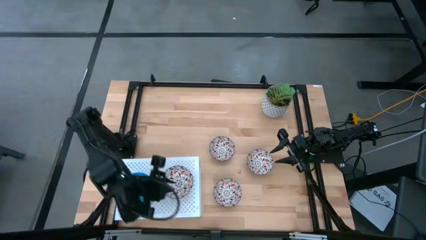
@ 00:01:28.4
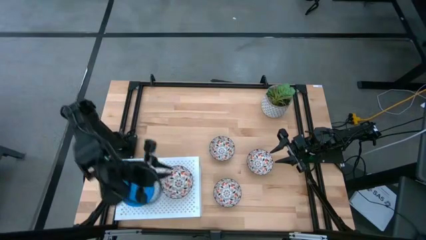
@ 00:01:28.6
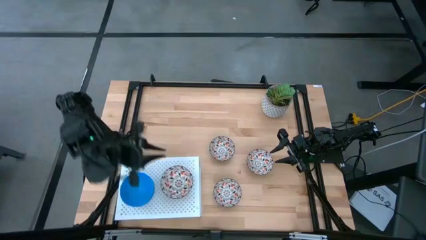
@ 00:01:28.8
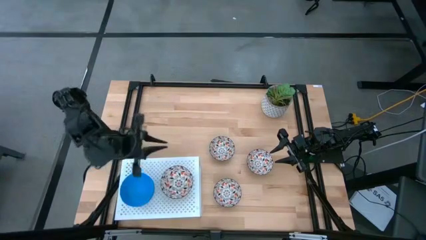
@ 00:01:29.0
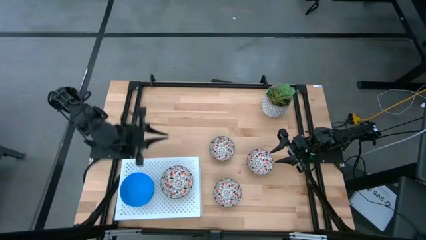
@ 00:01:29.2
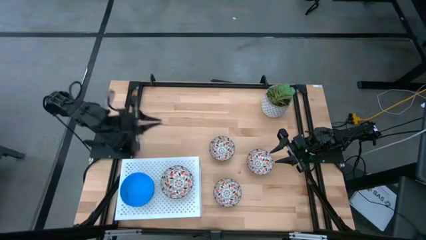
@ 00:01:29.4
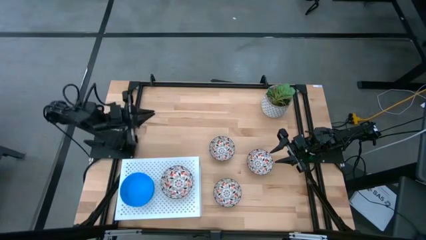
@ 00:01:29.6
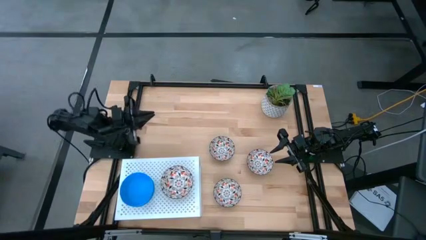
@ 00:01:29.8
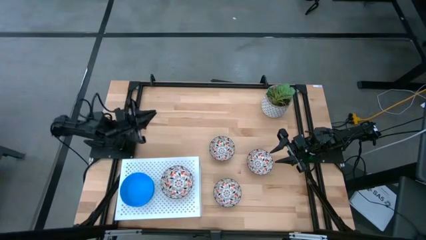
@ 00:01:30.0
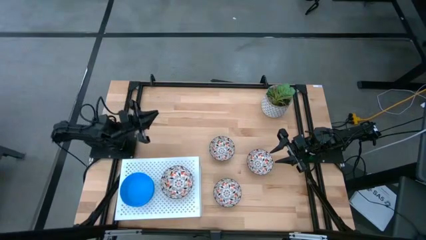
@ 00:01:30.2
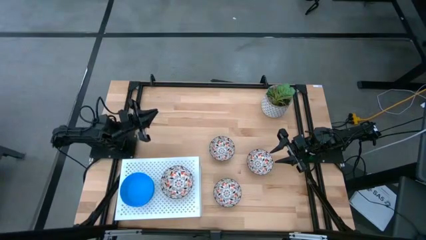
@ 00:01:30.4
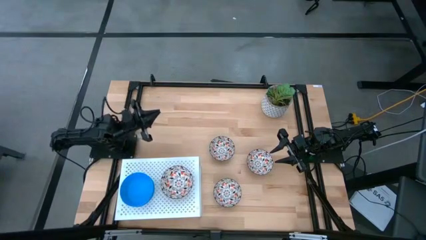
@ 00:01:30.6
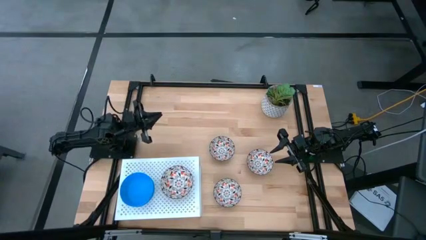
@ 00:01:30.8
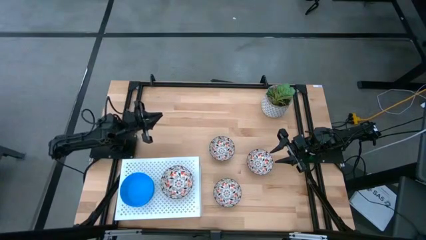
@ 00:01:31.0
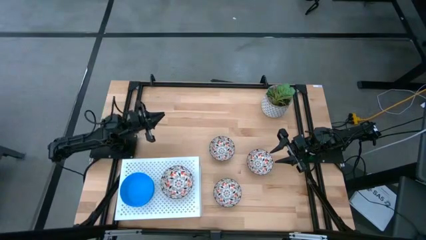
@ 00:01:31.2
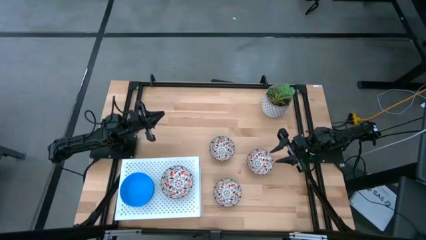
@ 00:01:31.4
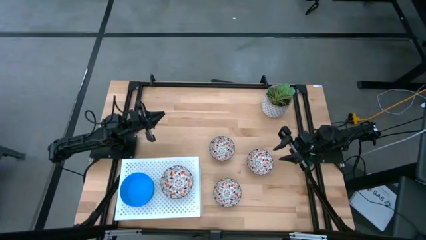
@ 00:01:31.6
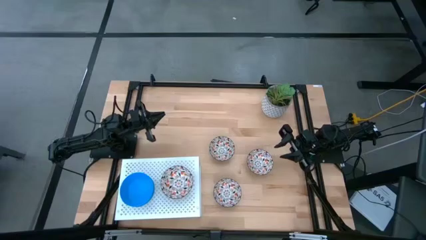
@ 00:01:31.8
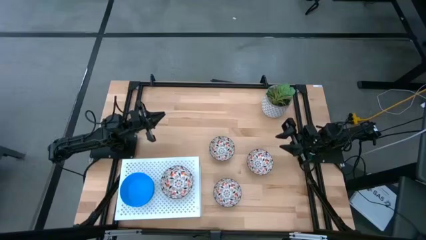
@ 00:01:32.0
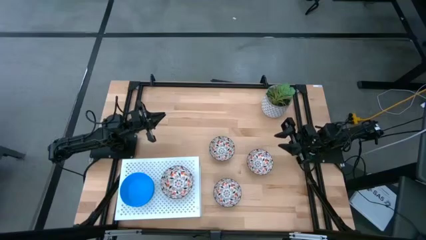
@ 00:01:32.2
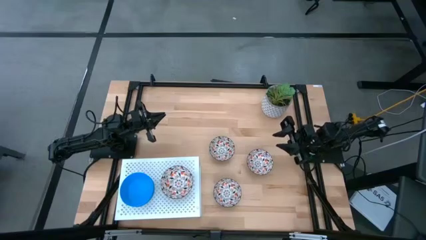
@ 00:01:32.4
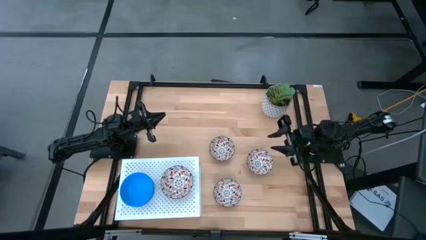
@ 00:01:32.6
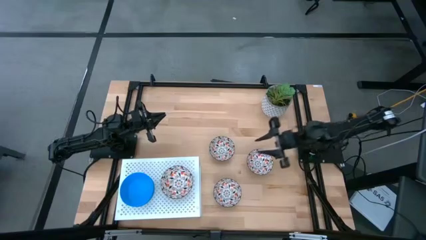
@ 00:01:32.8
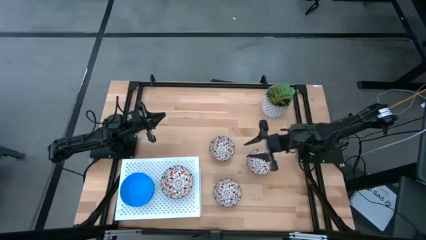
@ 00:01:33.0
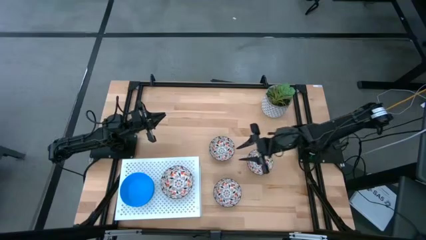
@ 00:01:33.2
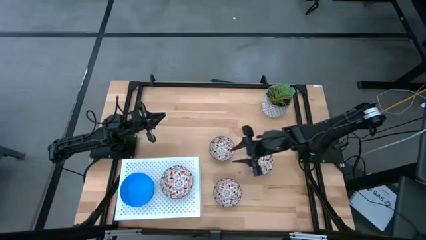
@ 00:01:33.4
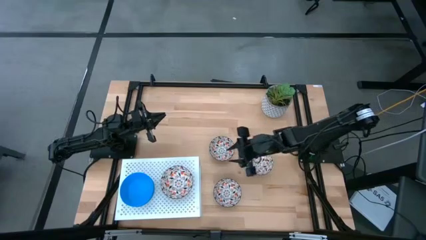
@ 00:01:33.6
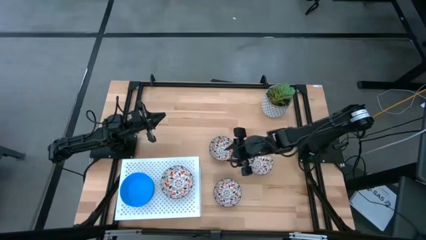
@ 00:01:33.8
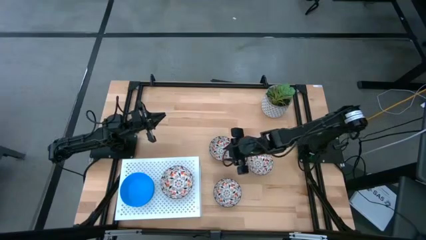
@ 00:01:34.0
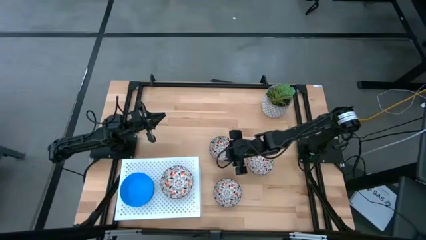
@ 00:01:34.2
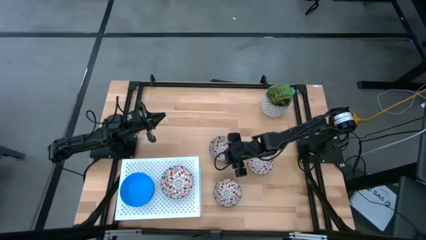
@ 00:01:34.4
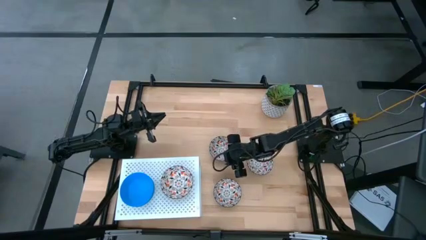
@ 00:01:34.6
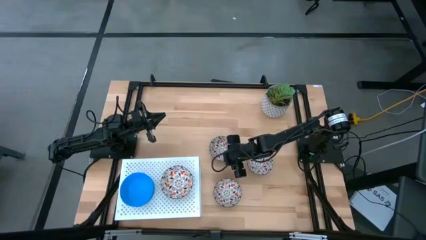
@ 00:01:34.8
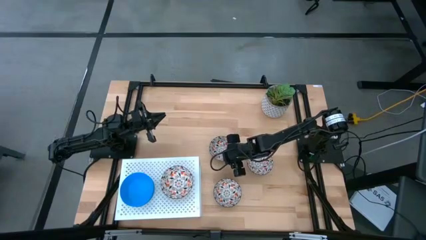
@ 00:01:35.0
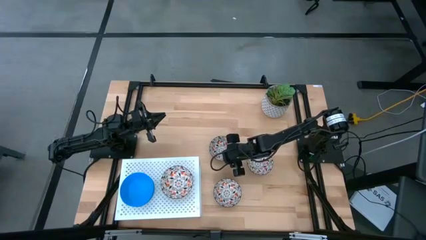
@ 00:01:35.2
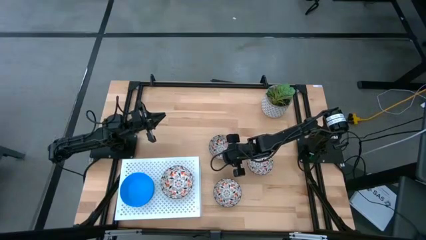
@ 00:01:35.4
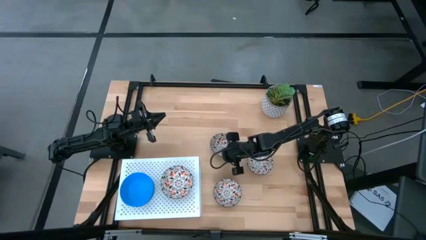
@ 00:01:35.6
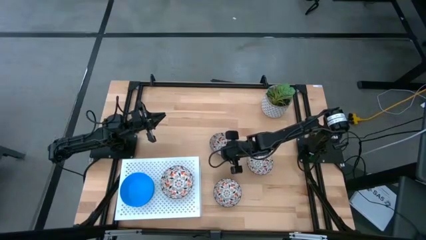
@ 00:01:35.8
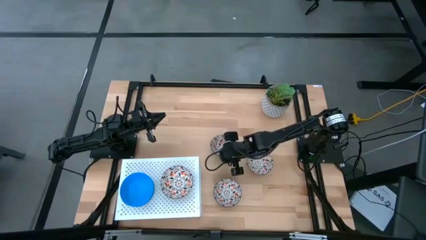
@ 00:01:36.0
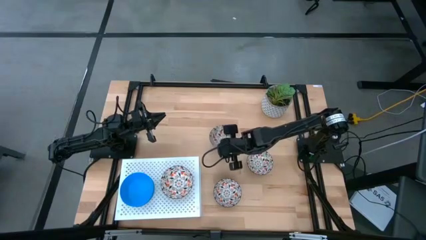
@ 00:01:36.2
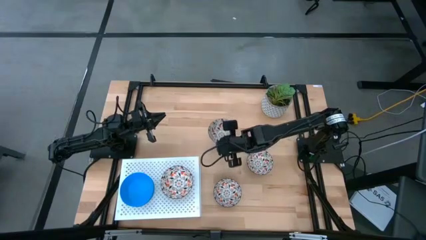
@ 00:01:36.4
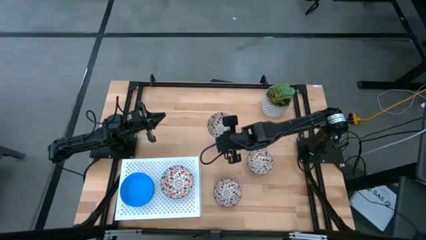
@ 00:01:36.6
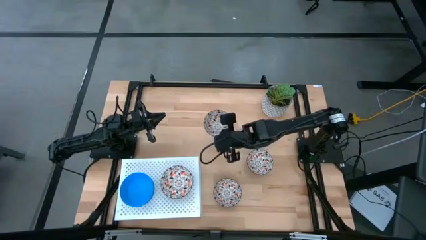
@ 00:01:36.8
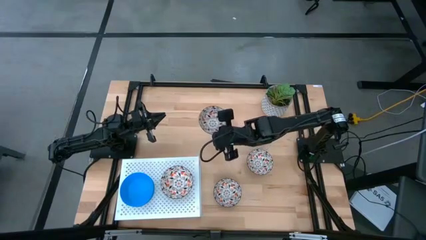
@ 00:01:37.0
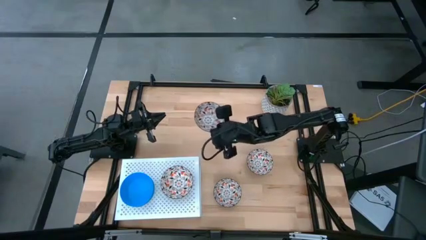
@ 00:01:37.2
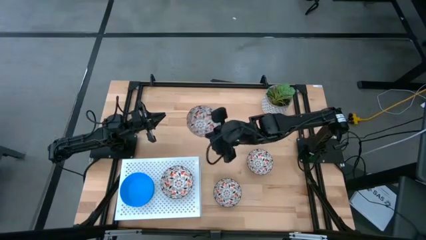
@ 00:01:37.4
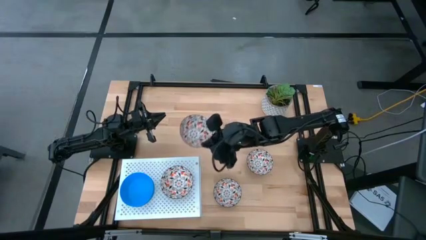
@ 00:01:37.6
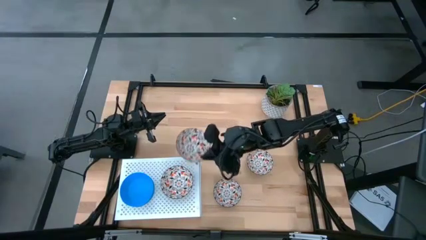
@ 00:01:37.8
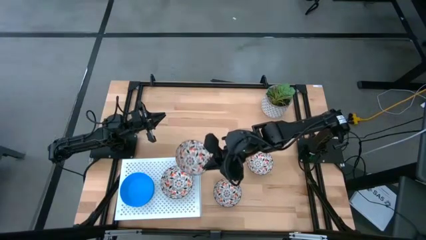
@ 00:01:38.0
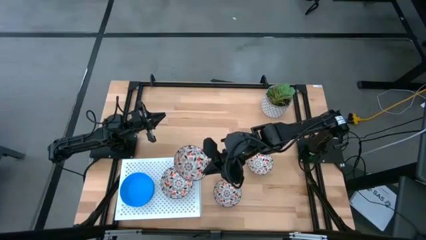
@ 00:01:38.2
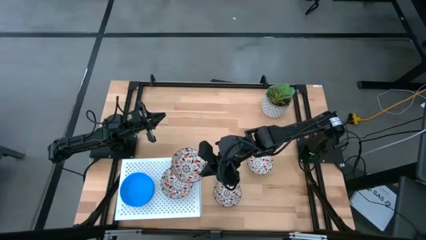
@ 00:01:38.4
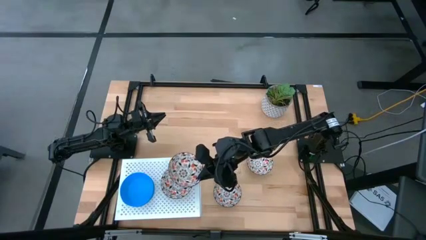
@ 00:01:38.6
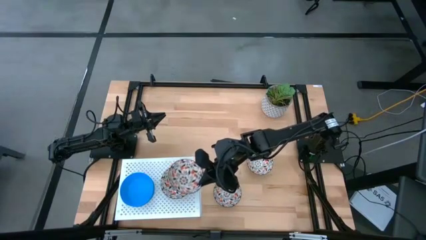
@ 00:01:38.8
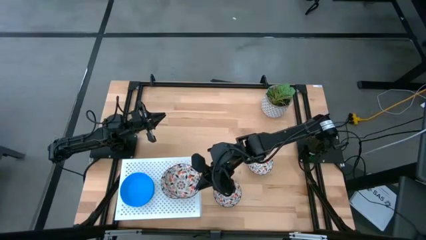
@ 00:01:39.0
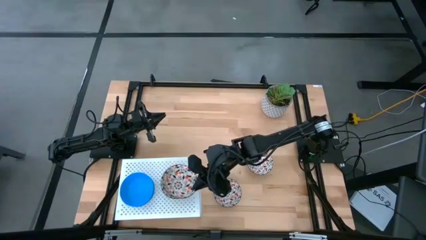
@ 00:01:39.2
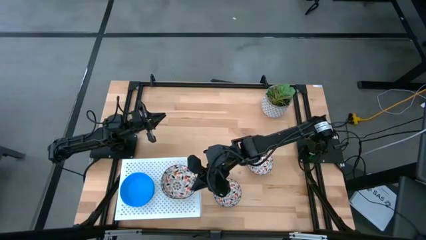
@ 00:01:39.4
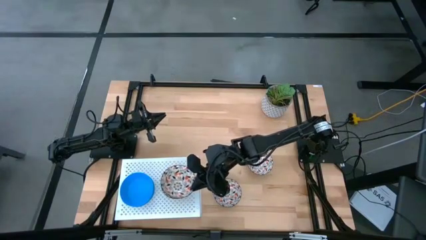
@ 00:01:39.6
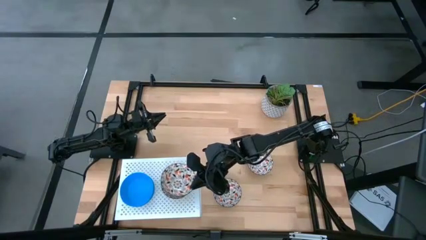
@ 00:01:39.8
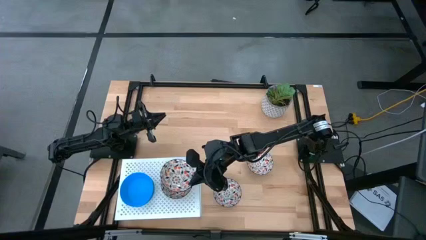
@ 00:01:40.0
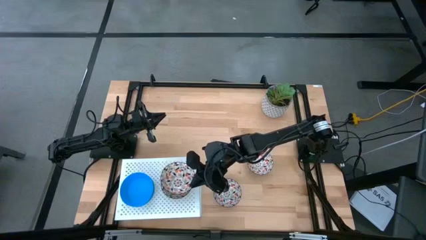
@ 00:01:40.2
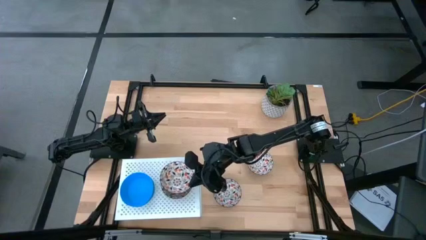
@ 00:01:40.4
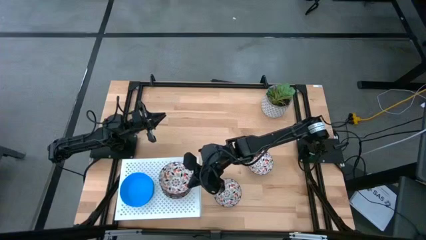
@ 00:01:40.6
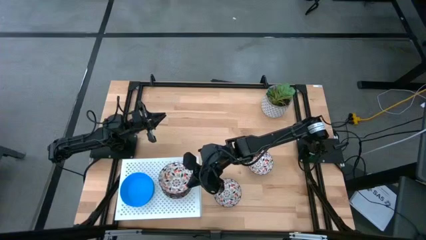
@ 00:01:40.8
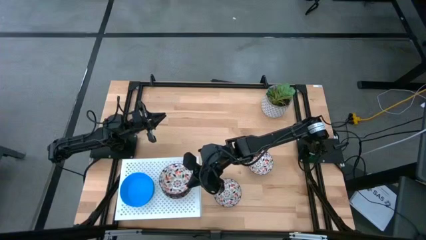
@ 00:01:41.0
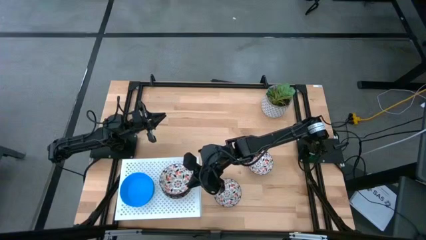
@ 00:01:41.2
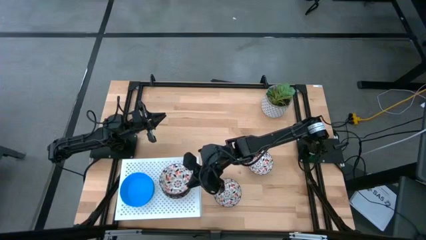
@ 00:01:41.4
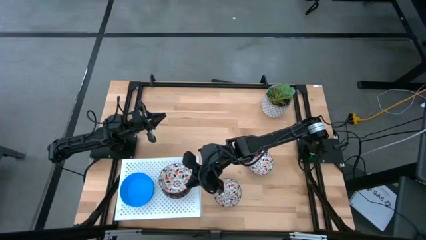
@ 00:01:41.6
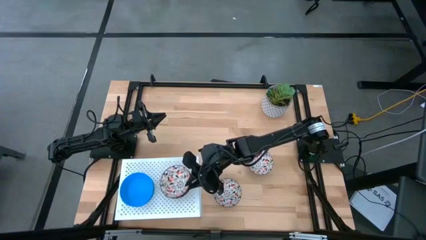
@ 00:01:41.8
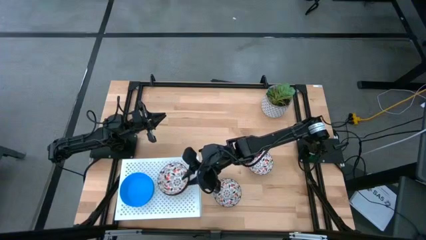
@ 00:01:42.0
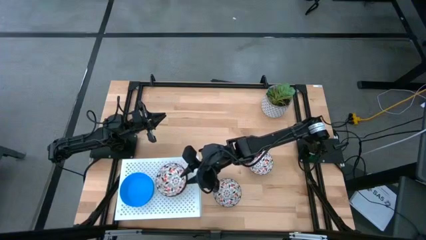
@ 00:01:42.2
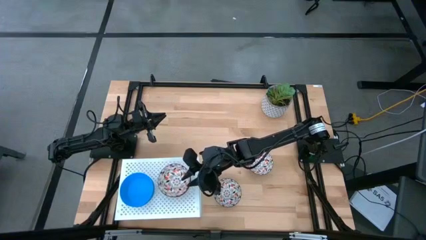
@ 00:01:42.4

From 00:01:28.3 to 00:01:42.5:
Task: Pick & Place Mini bowls
Stack the orange patterned bowl on the orange patterned bowl on the shelf
